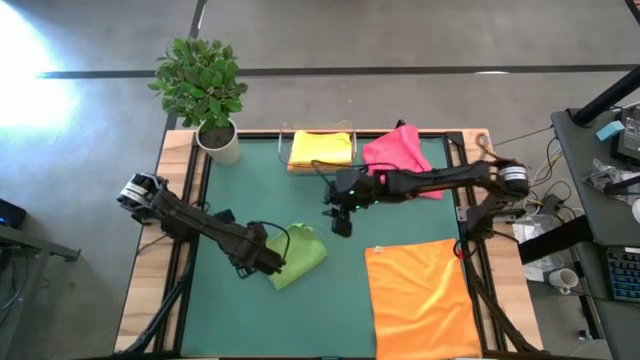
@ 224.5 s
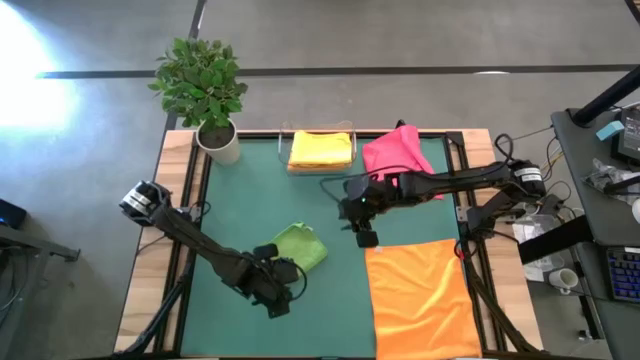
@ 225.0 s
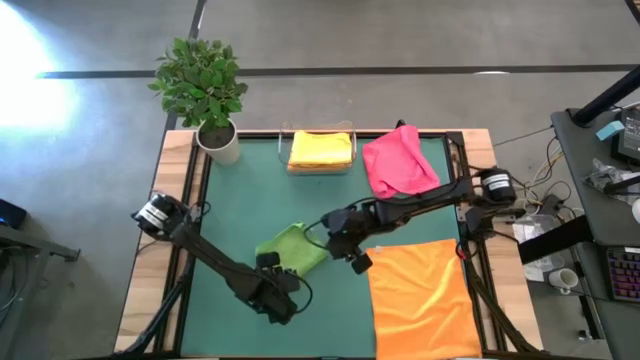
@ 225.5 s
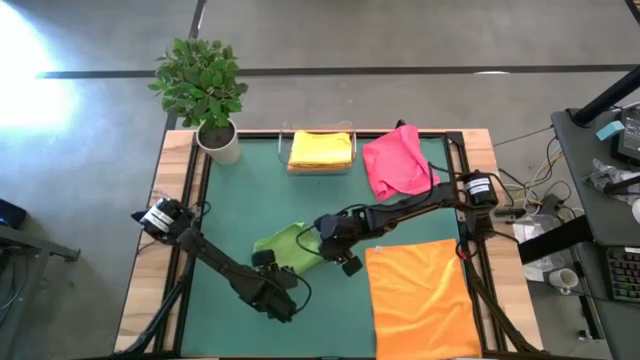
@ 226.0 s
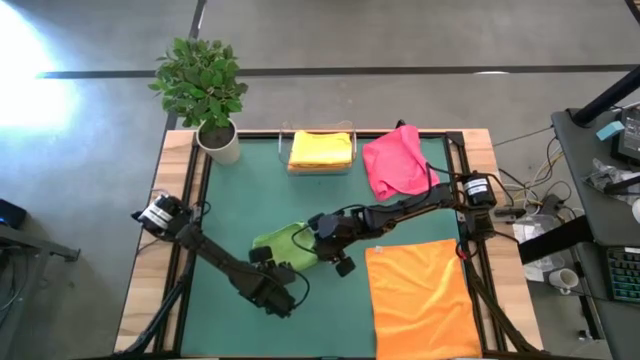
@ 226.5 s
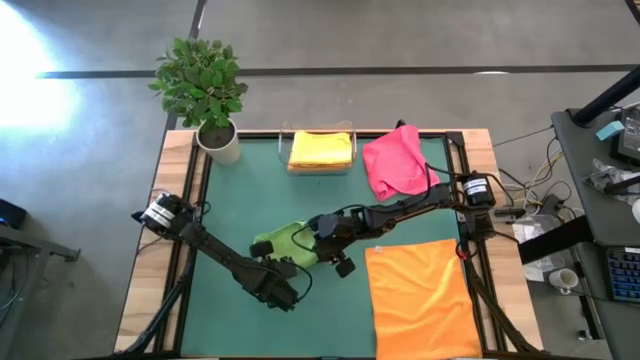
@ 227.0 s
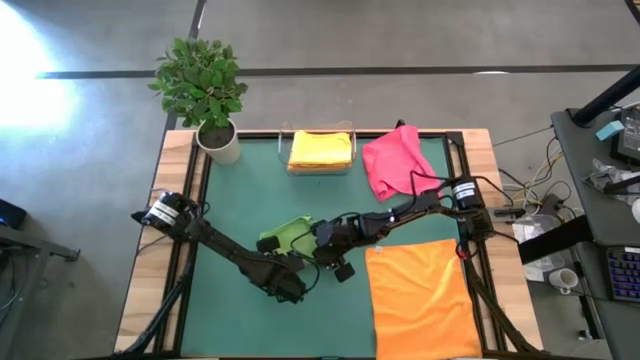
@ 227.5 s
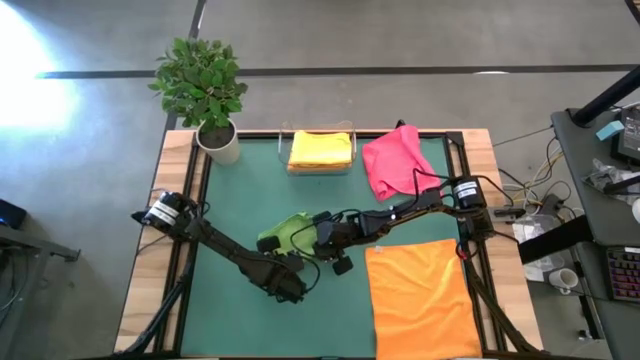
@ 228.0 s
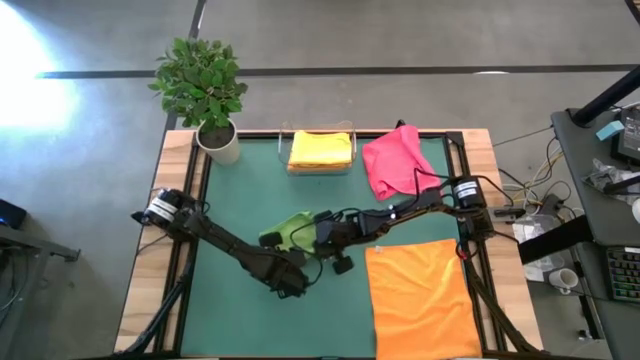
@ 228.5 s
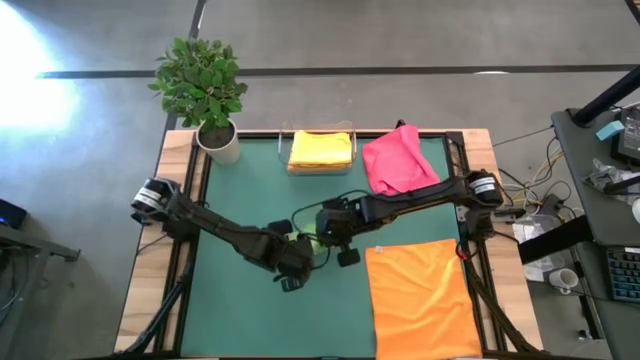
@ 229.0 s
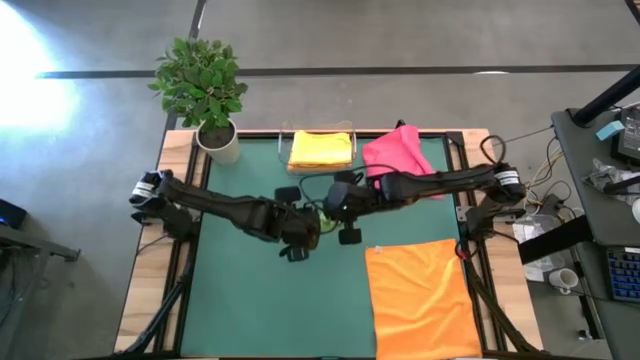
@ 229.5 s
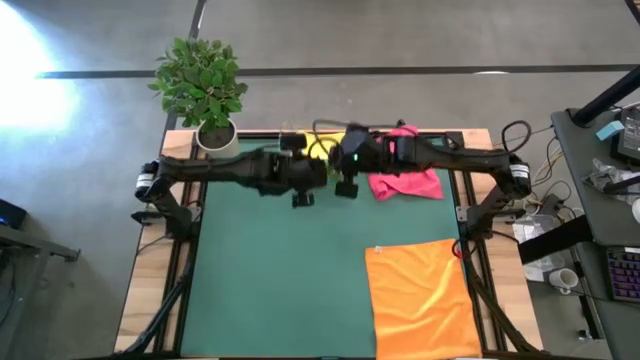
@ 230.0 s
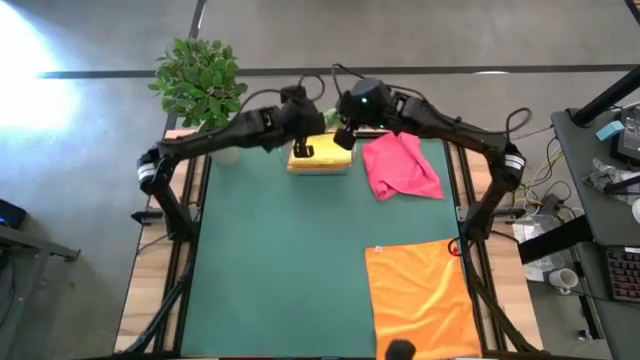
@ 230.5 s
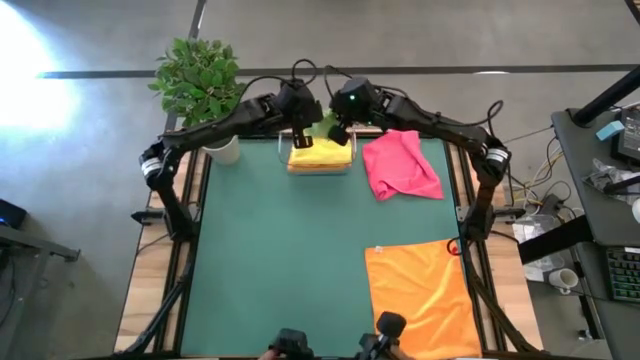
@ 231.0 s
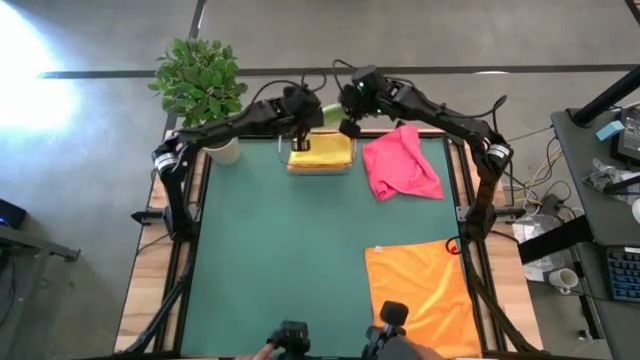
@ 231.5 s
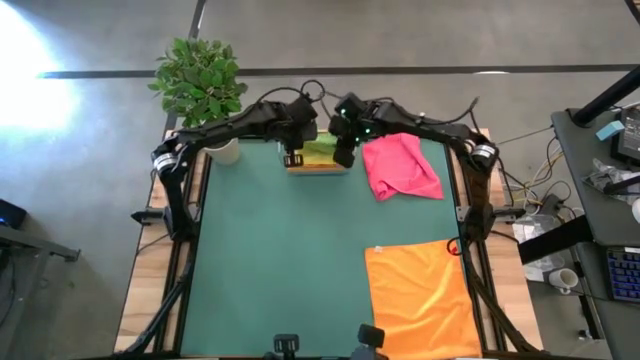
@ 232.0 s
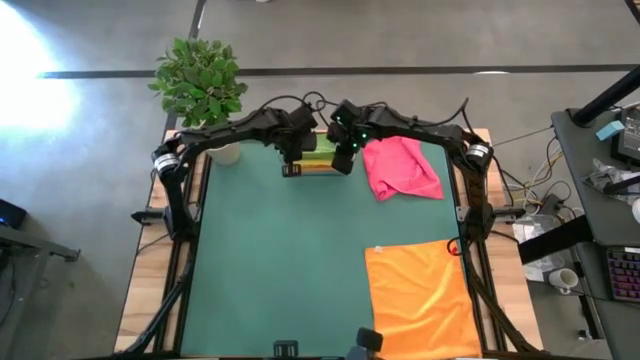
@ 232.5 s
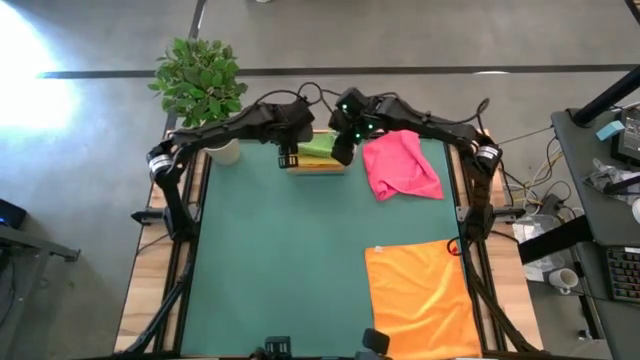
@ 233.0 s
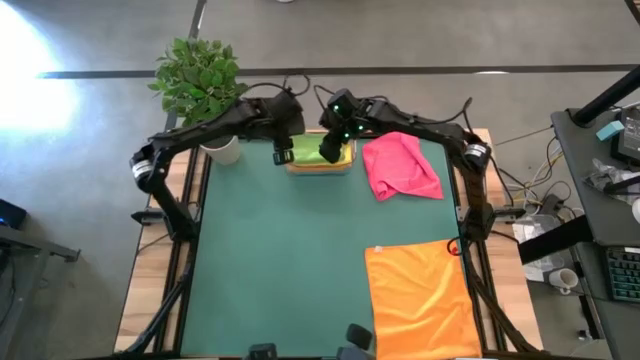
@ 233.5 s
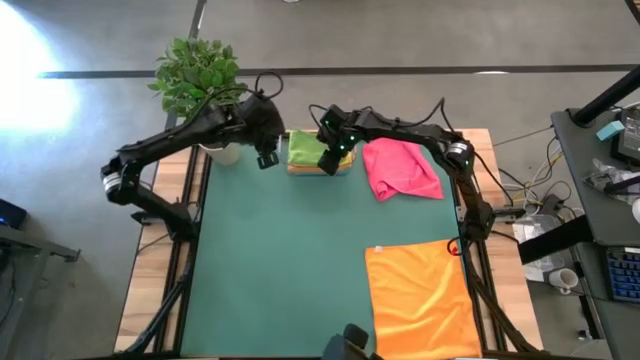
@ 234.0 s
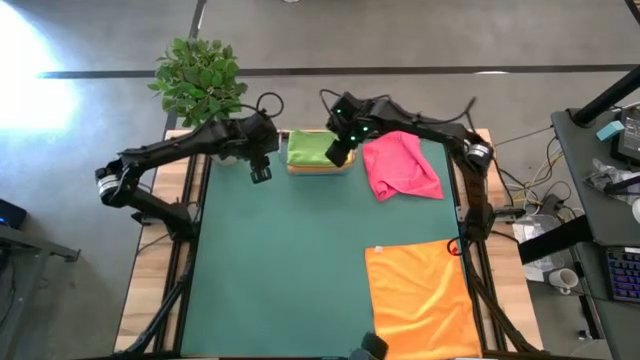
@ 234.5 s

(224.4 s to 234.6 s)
Task: Fold microfiber towels
Put the folded green microfiber towel into the transparent bin
